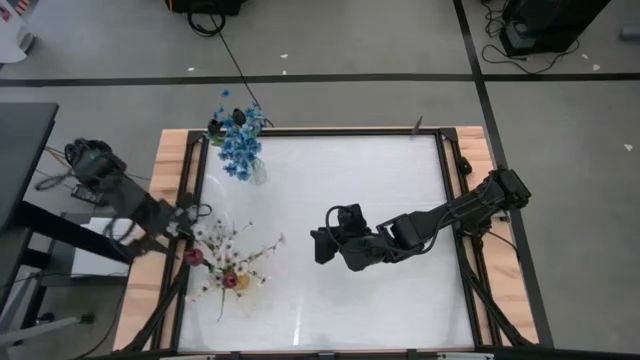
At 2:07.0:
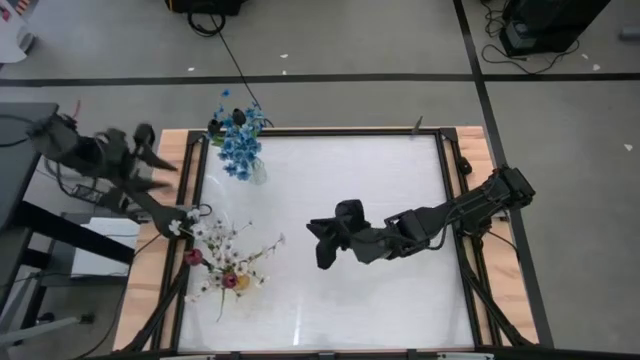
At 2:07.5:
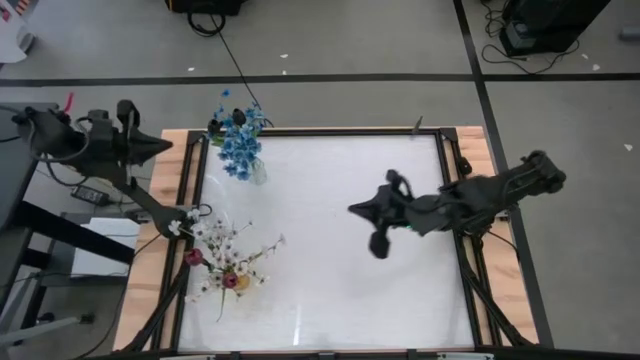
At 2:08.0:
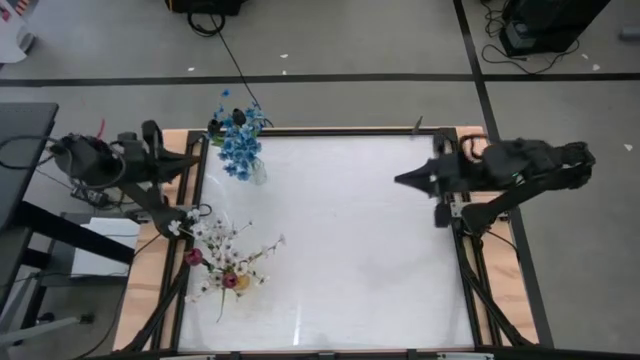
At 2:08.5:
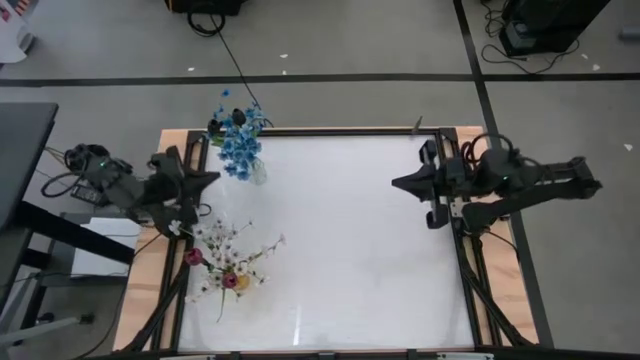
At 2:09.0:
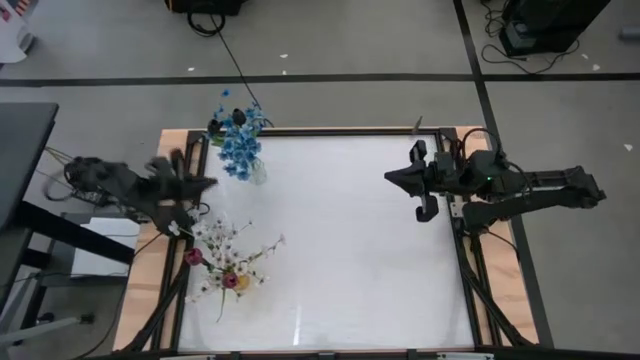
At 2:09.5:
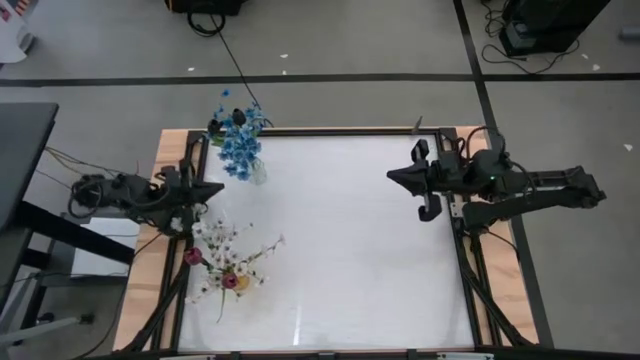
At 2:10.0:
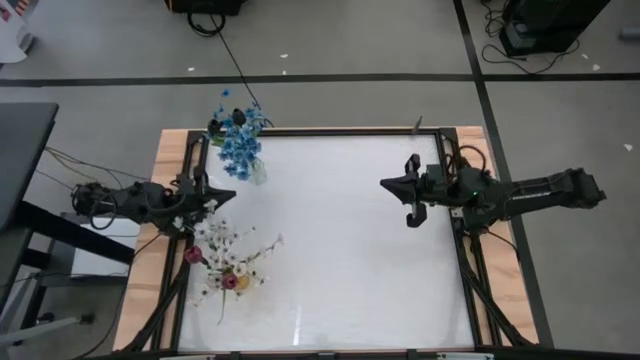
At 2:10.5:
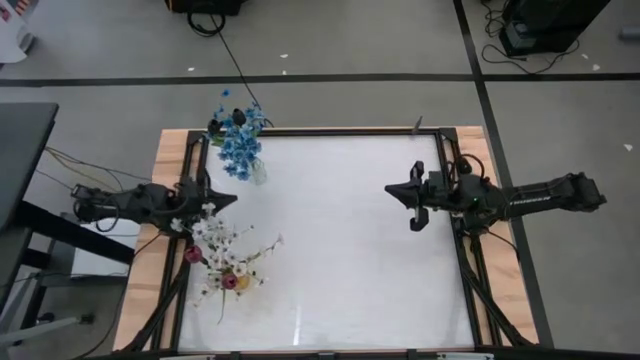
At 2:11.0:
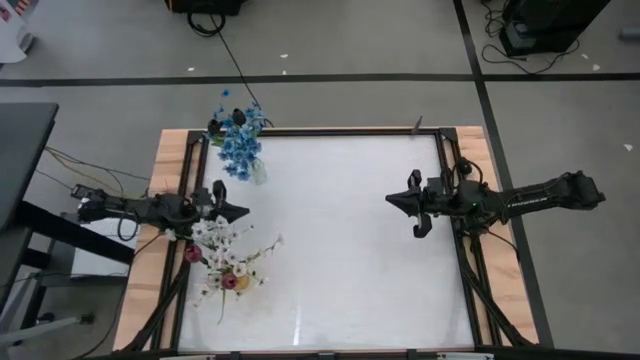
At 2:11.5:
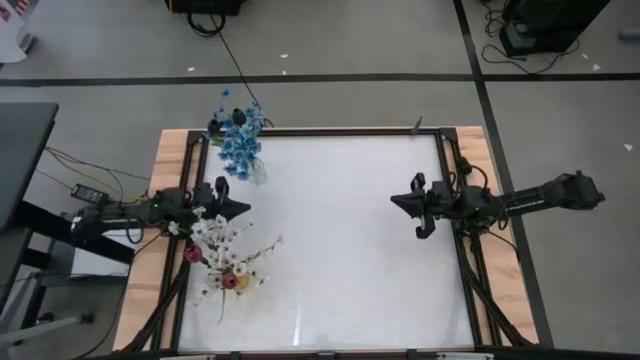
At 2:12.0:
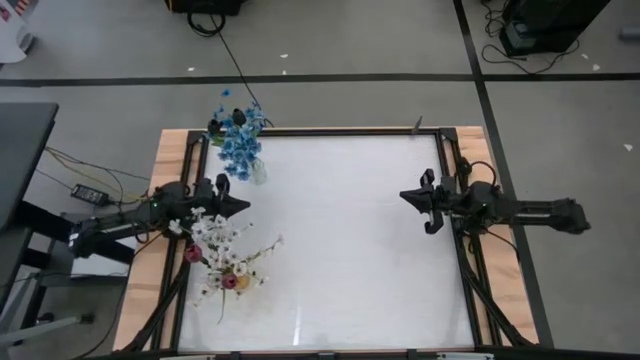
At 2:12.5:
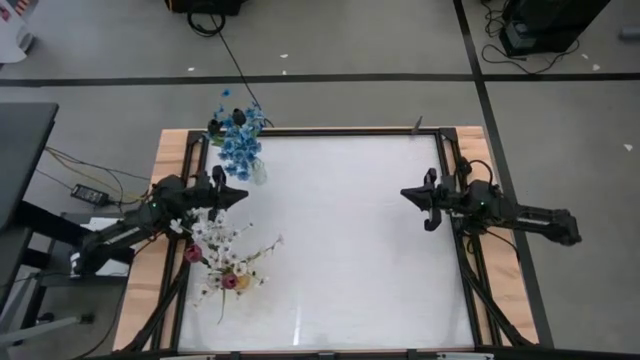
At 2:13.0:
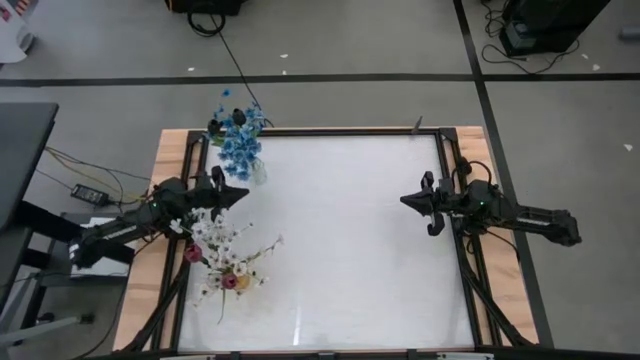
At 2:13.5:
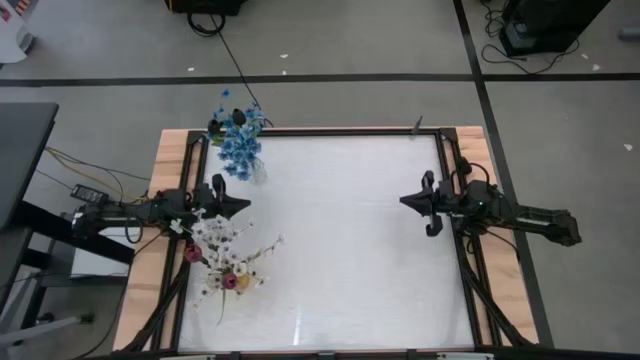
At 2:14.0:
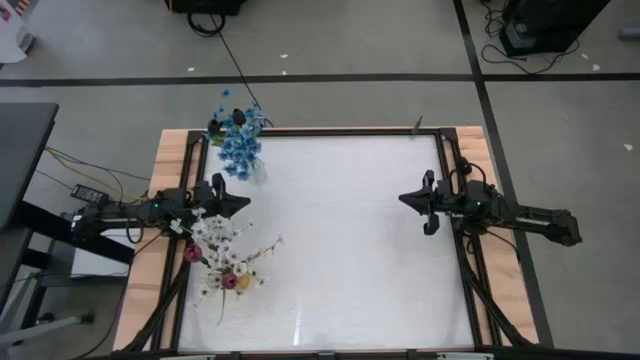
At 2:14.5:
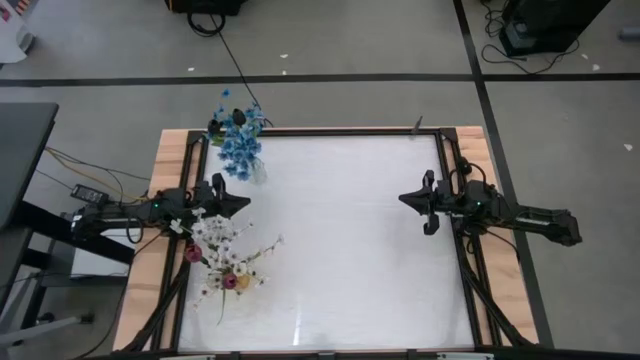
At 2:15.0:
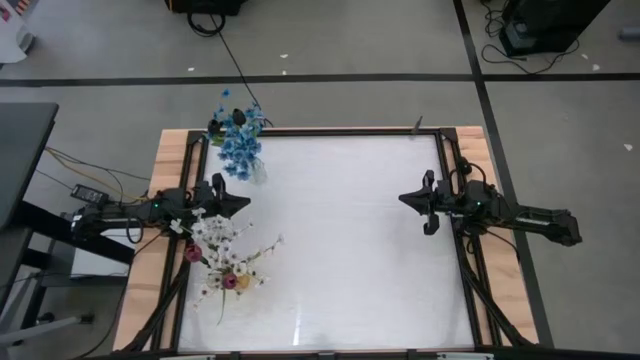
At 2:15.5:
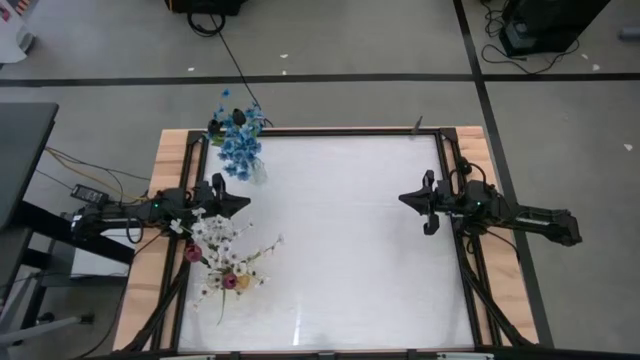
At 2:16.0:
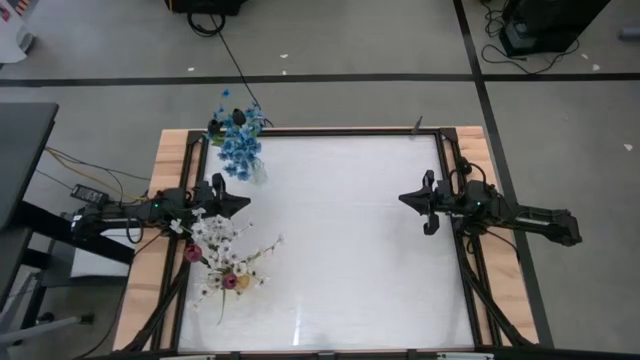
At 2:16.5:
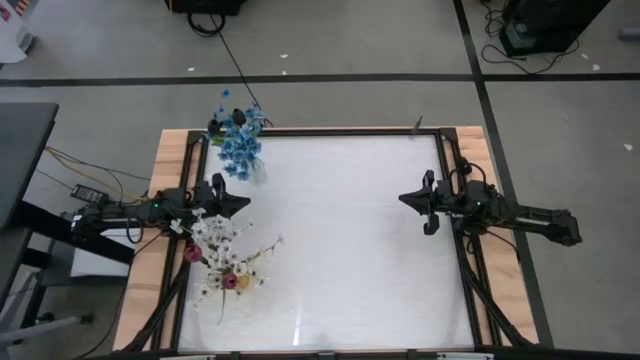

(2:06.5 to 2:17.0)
Task: Sort flowers into vase by color
Return to Home Position

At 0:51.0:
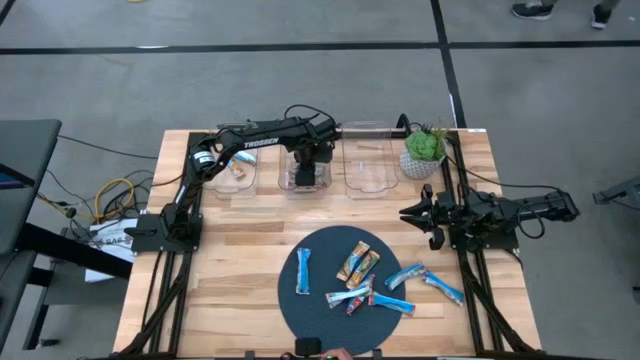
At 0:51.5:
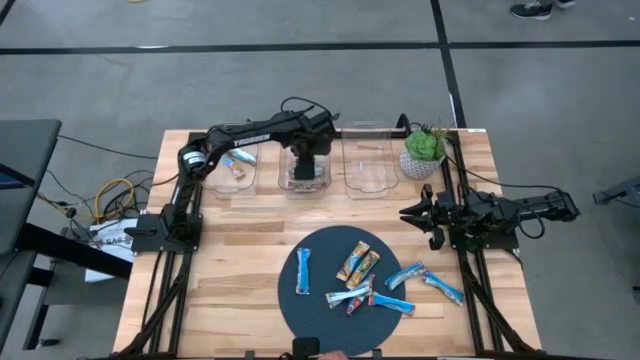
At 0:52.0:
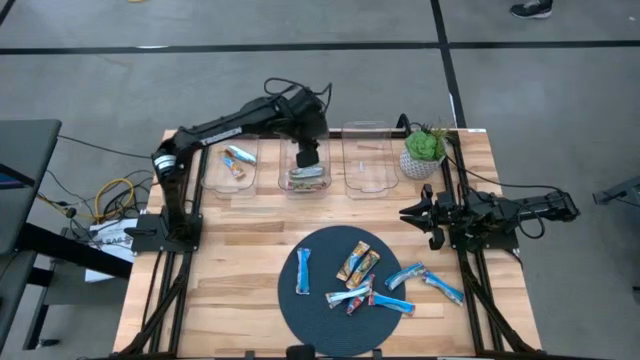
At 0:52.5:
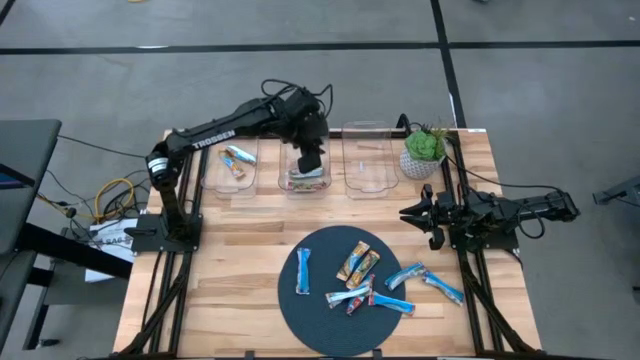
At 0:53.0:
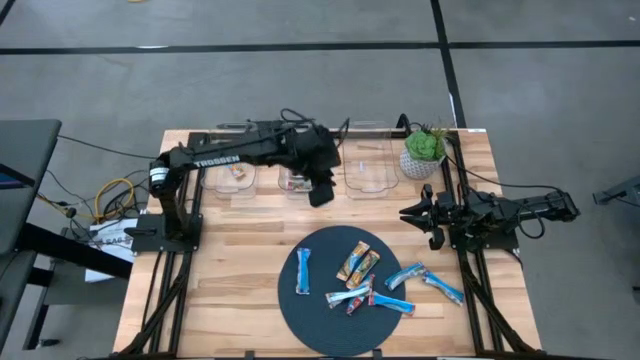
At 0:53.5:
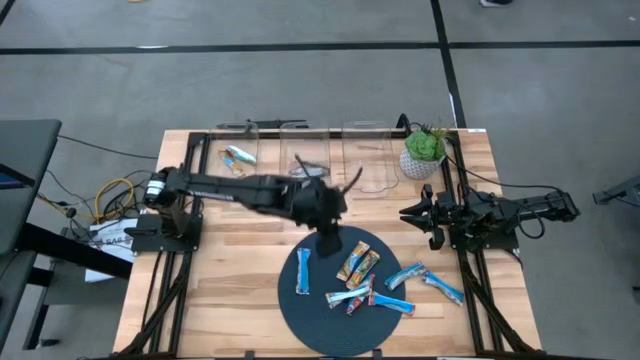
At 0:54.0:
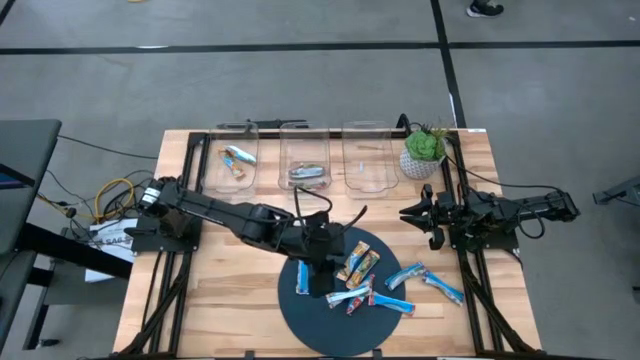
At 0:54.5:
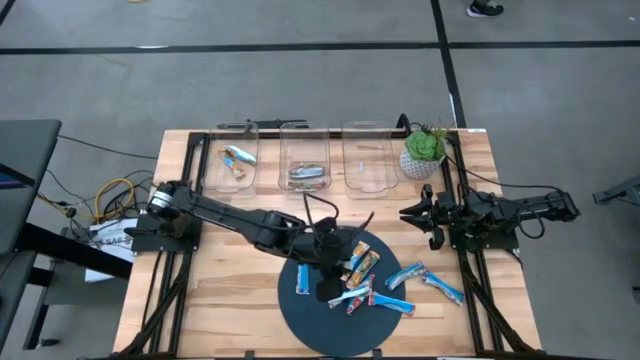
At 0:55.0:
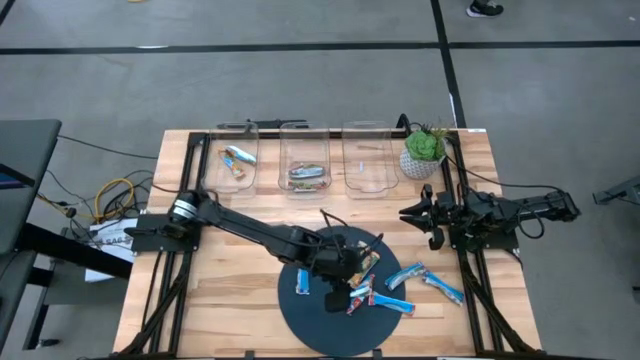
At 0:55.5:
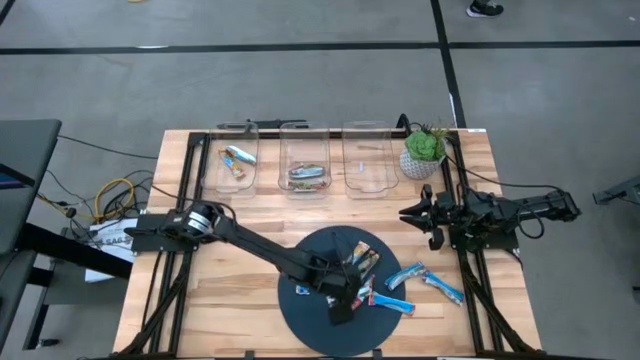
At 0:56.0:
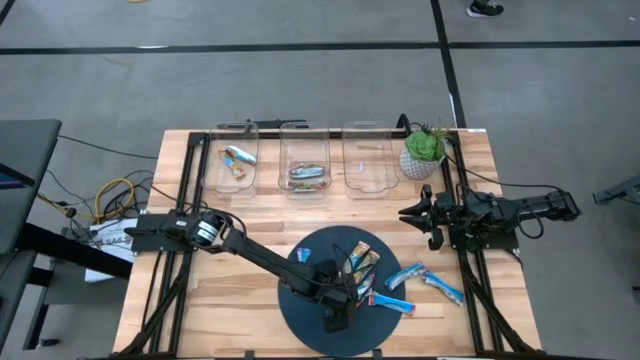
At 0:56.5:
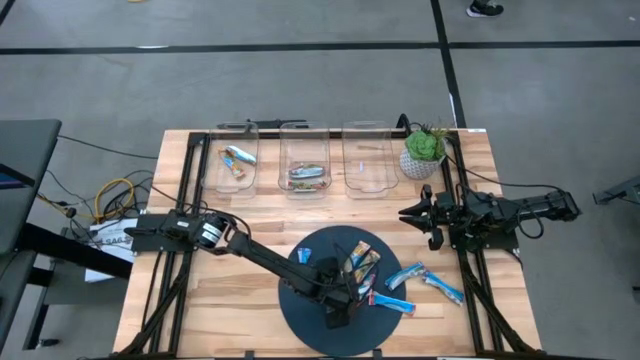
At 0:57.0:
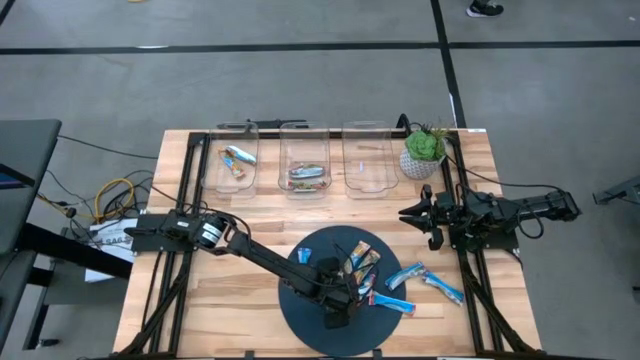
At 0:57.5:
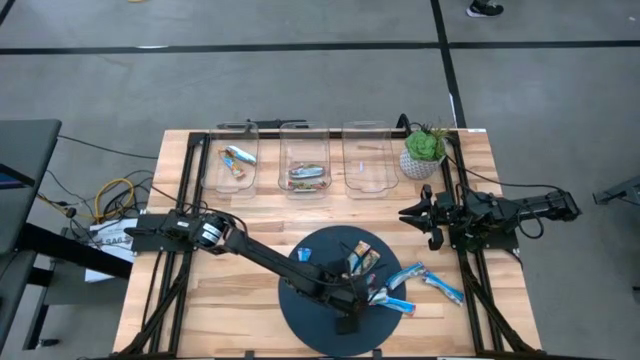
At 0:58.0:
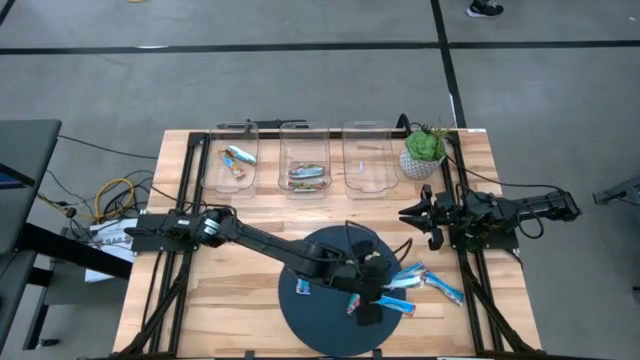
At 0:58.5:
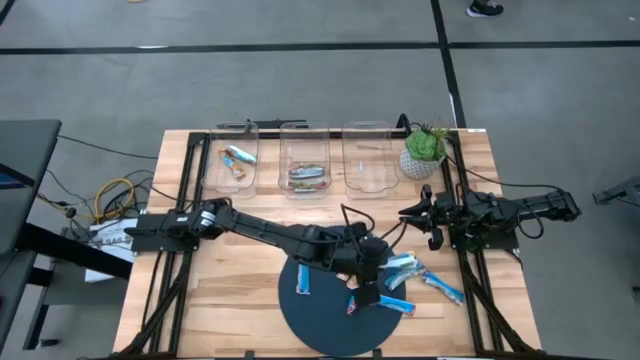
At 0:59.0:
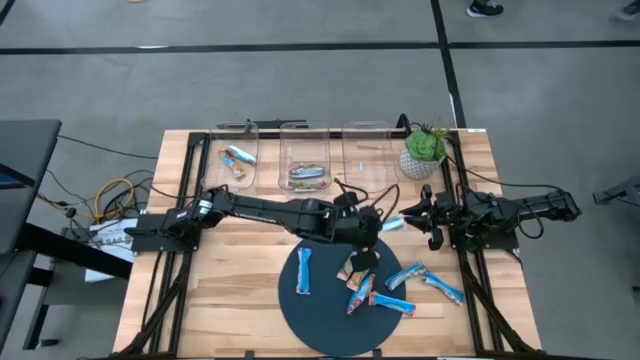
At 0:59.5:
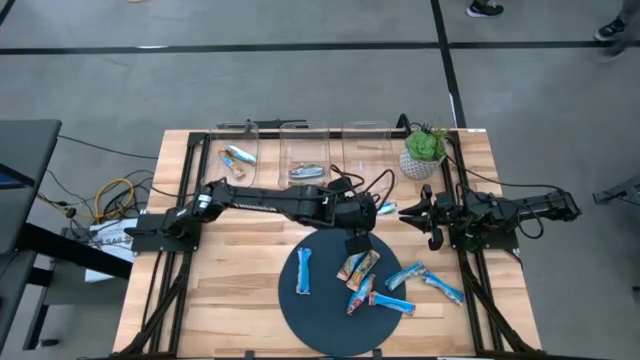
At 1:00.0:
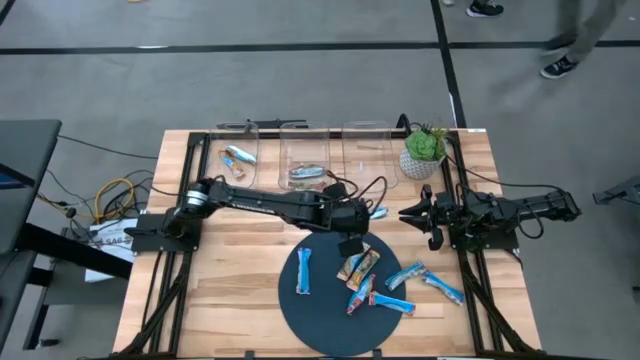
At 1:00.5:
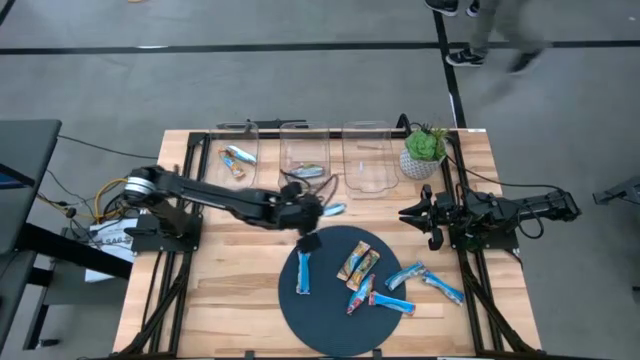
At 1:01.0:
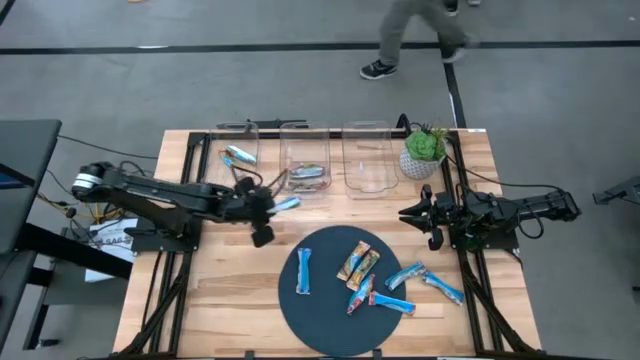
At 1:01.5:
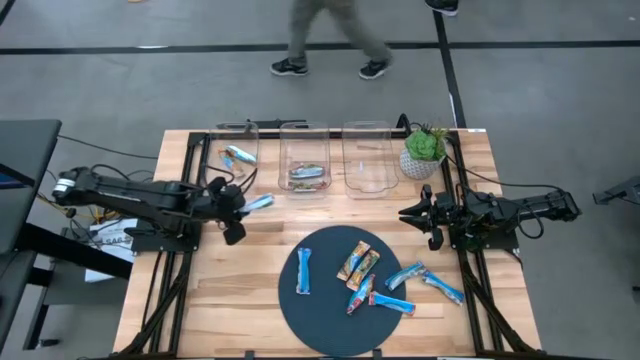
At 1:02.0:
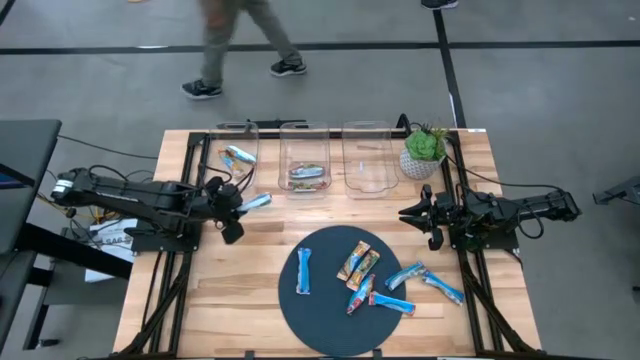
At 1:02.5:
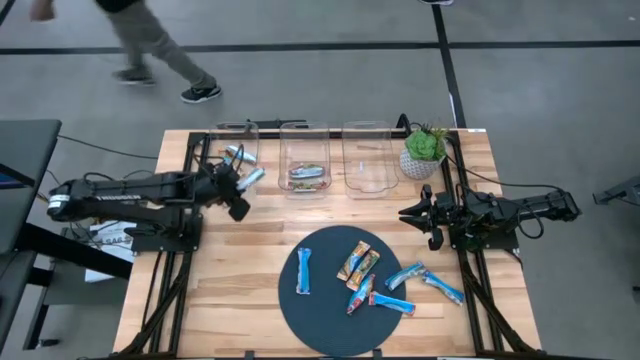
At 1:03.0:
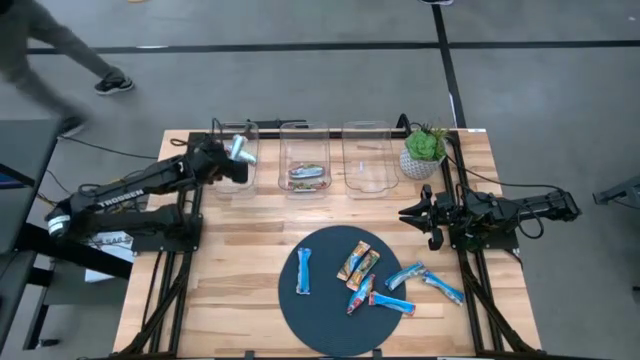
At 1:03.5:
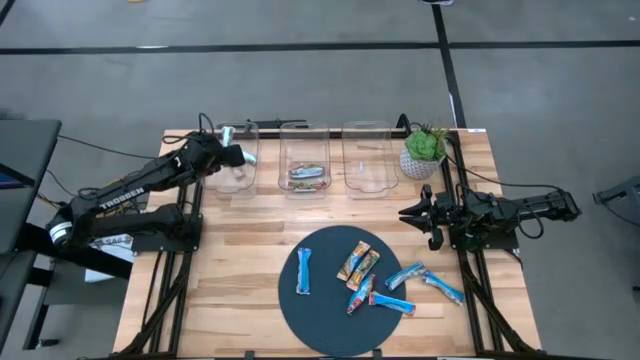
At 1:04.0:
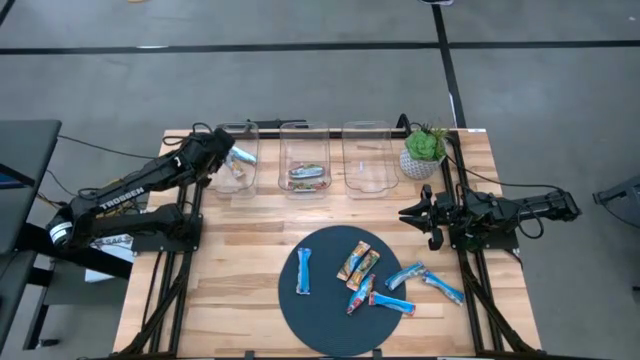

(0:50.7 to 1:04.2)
Task: Pick and place Granola Bars by type
Put the yellow granola bar into the left transparent bin
